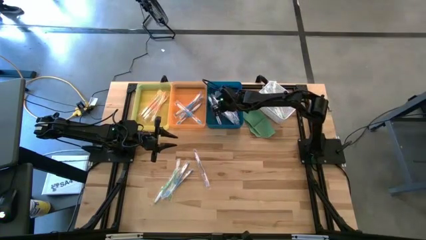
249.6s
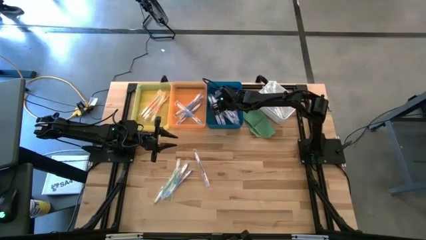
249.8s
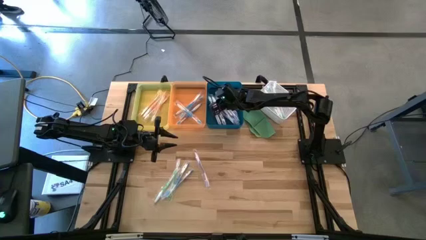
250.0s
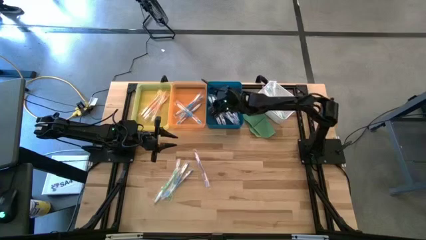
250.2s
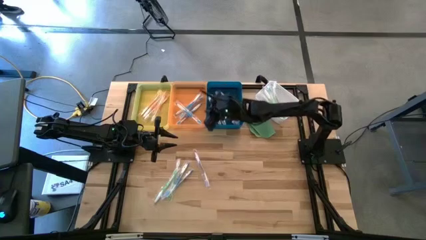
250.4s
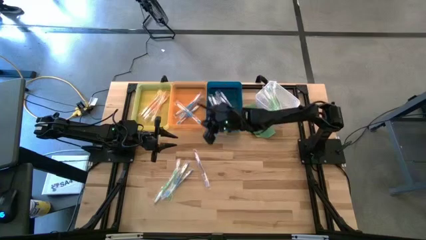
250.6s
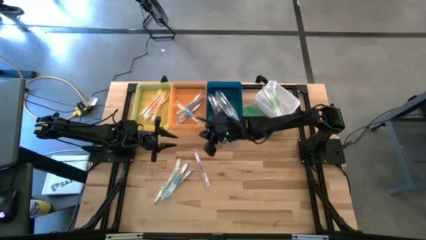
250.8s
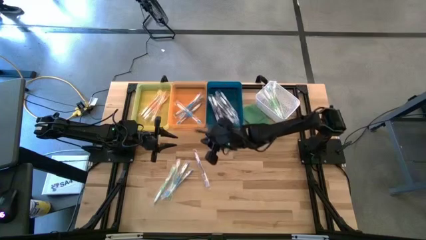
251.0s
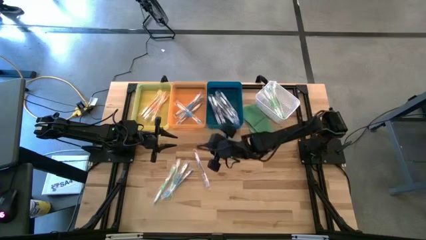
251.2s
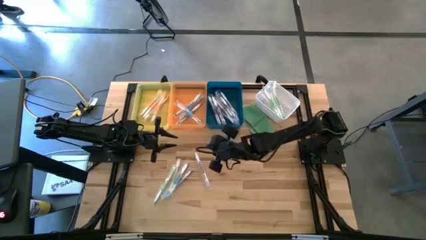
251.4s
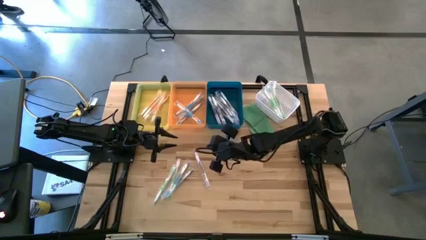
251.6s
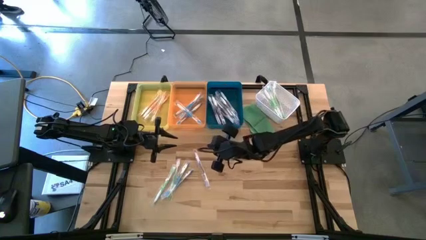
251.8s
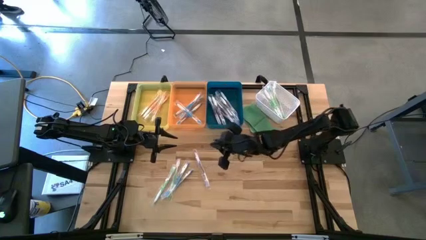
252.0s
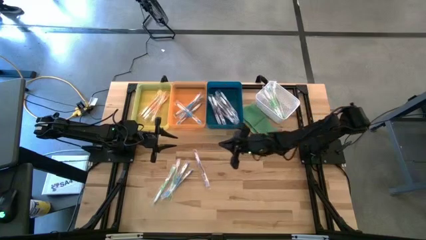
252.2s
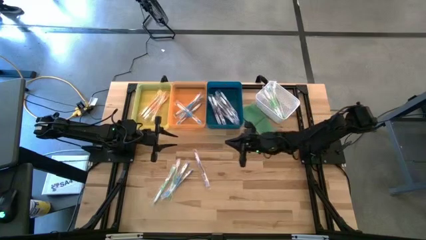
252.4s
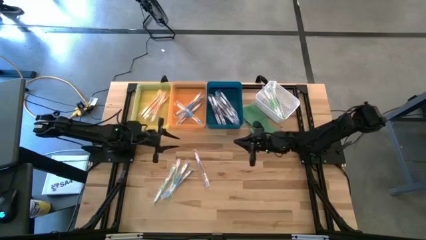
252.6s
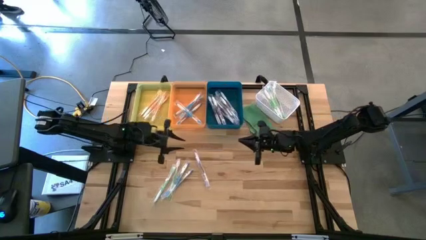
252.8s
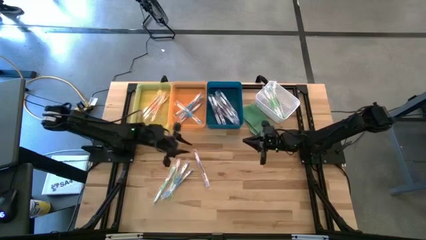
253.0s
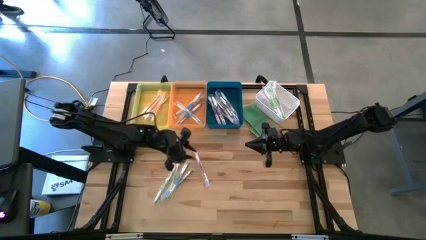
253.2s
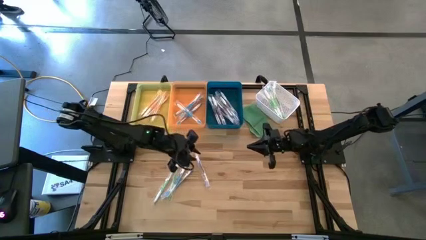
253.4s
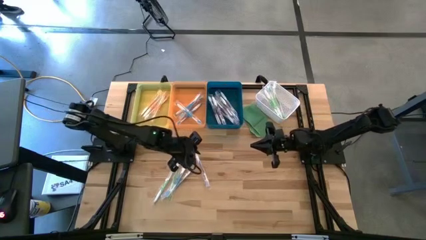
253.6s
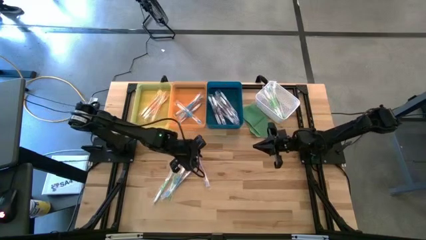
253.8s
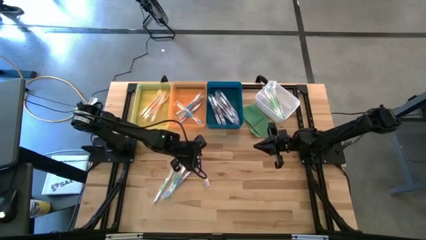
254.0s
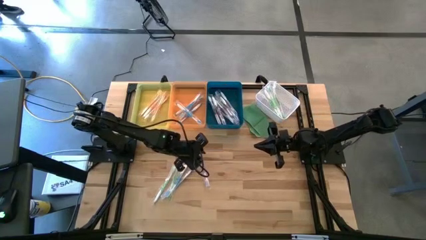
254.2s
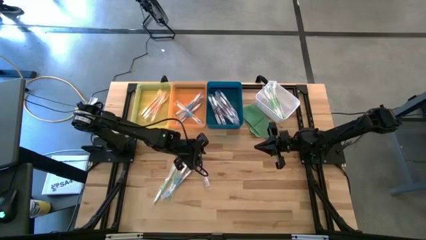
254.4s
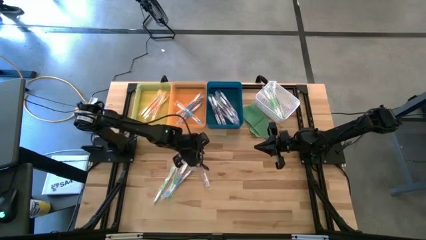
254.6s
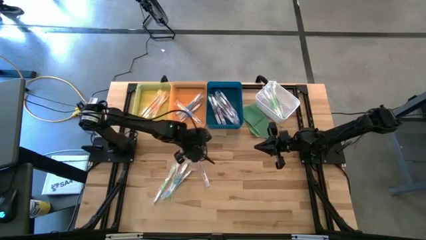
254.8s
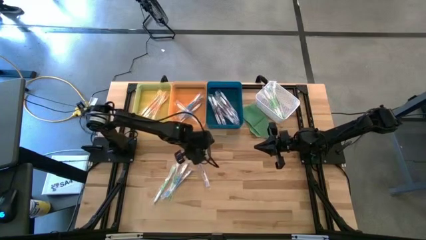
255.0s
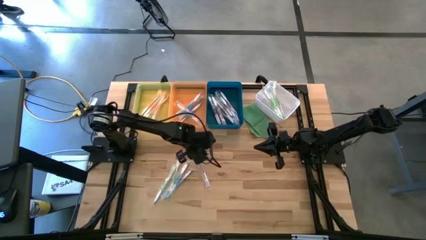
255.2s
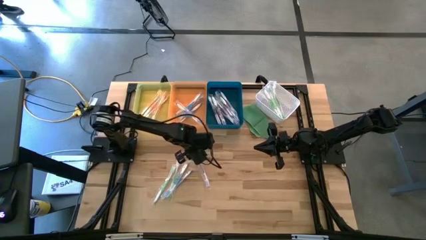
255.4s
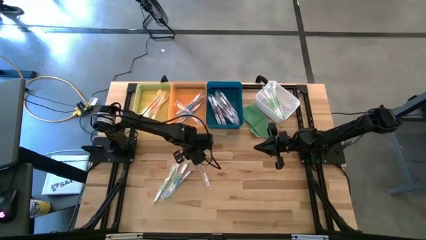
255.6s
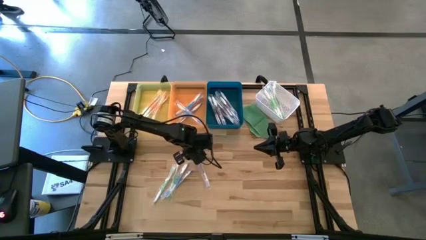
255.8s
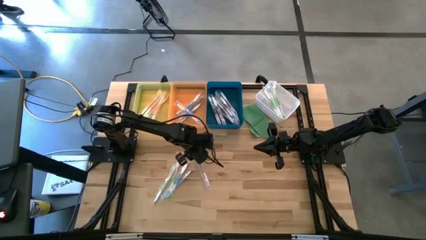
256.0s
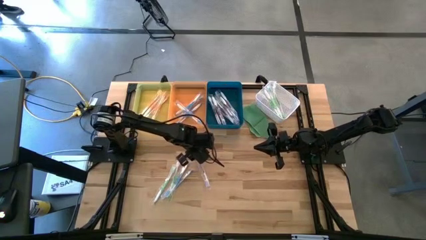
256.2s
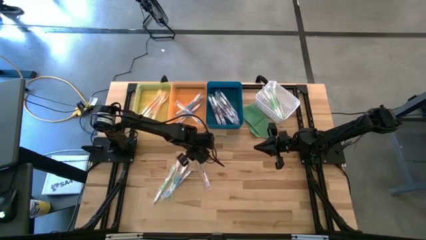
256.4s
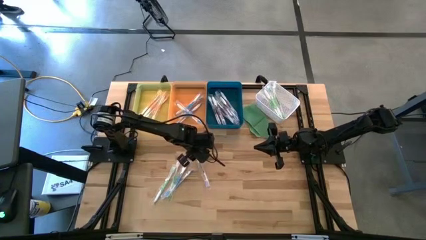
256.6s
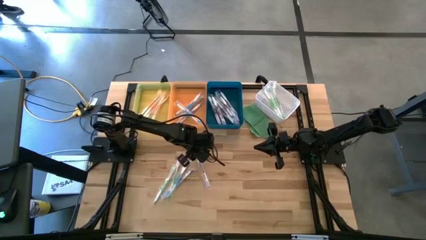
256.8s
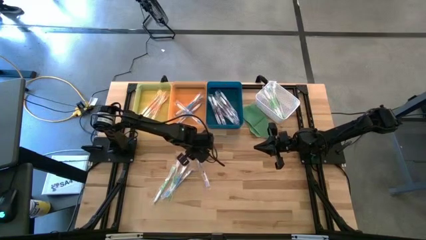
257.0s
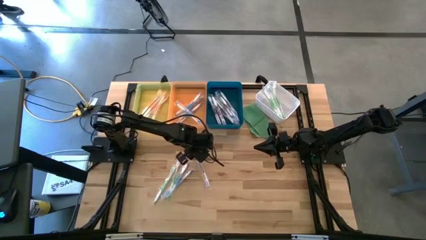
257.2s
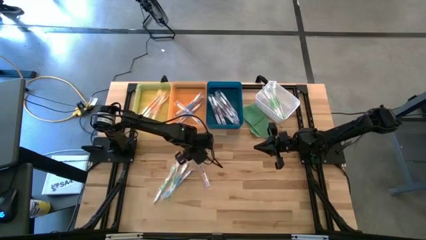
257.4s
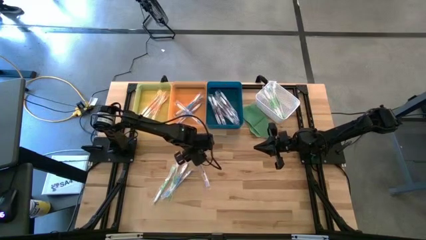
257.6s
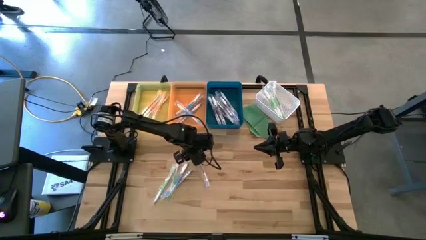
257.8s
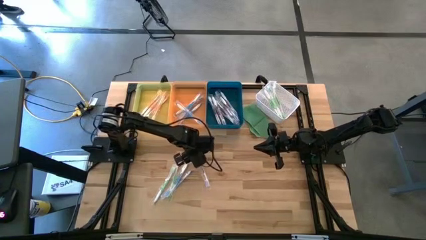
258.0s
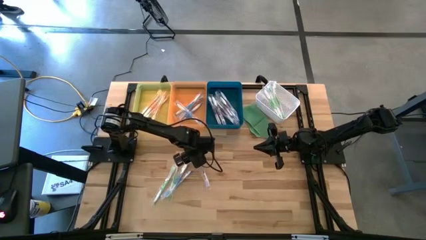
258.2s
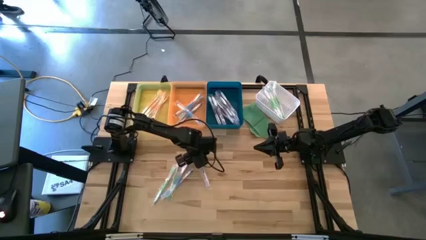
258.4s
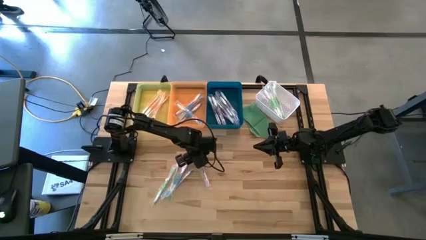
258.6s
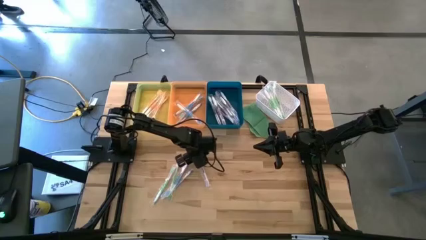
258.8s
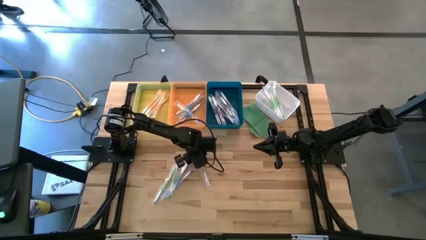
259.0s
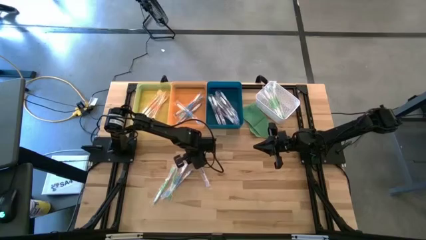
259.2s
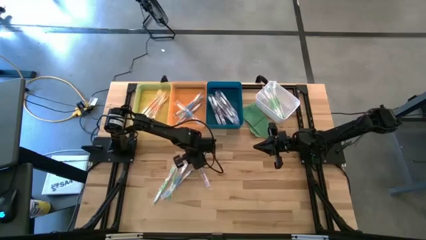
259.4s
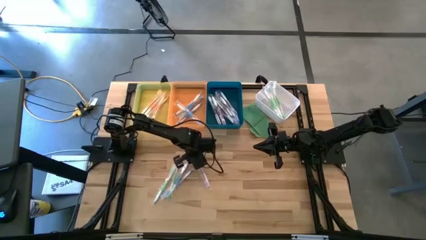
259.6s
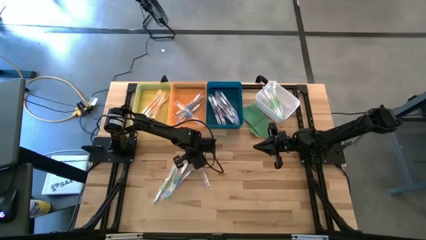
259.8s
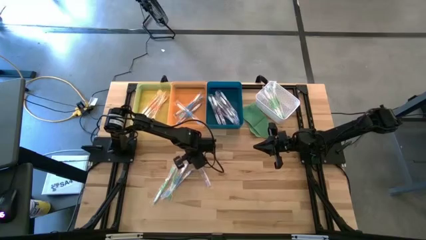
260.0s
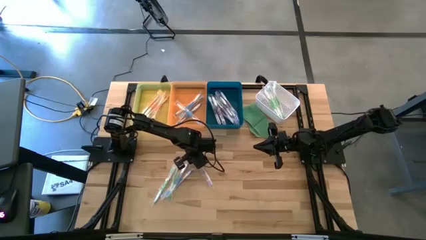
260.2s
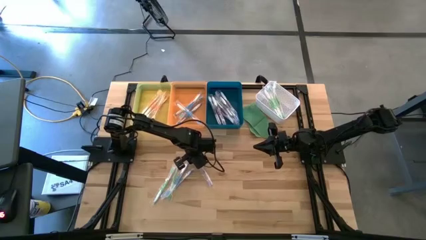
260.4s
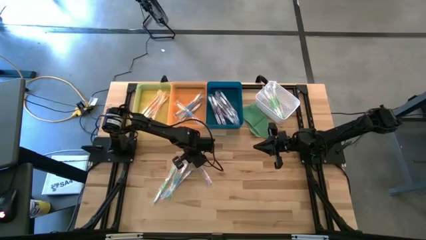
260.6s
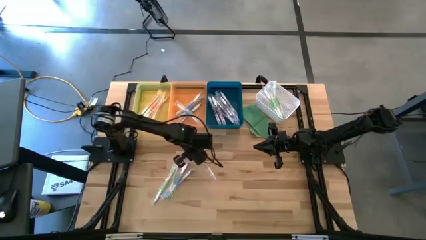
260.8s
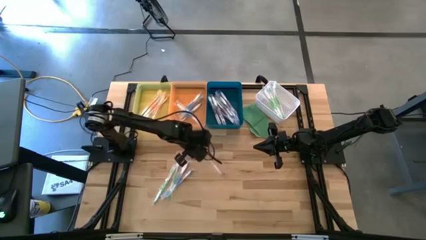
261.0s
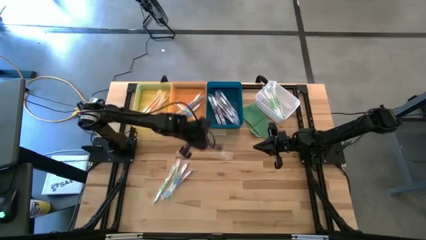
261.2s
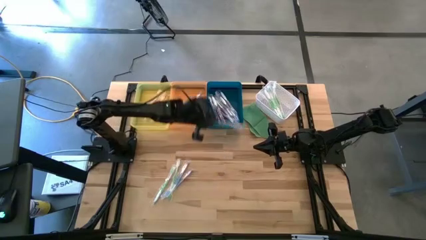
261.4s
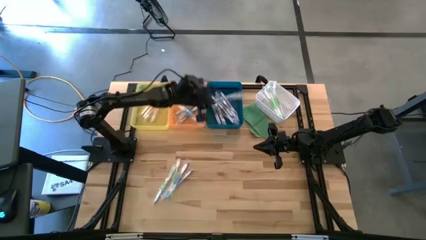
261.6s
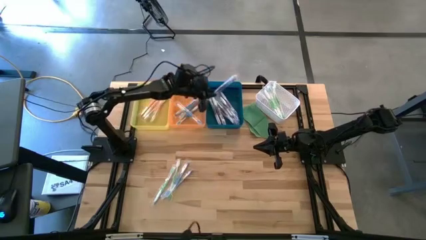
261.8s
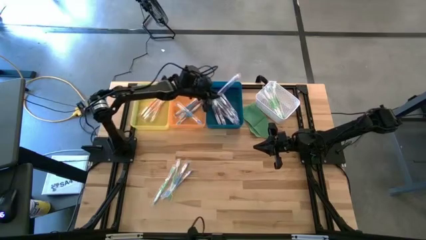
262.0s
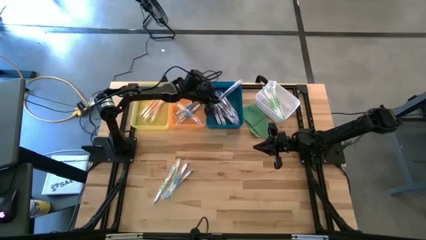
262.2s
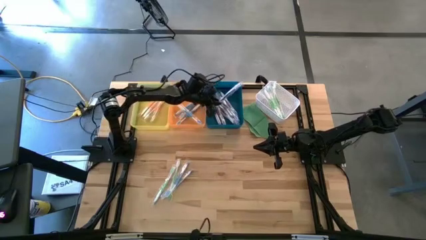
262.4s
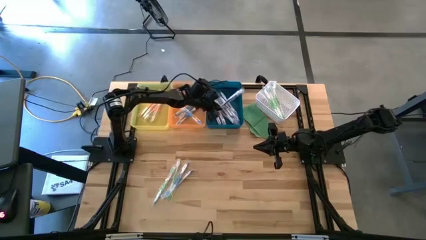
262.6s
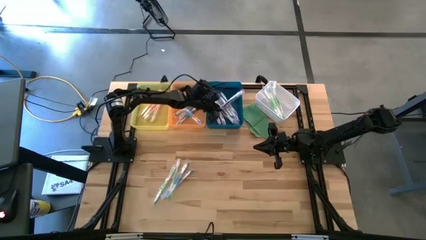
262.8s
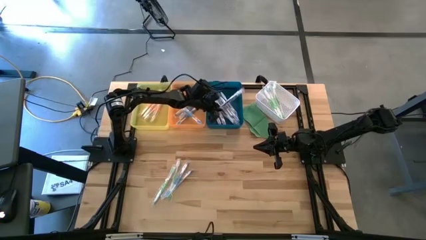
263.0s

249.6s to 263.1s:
Task: Pick & Place Toothbrushes
Put the purple toothbrush into the blue bin

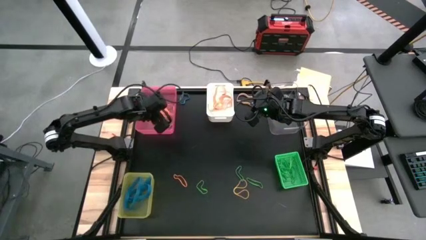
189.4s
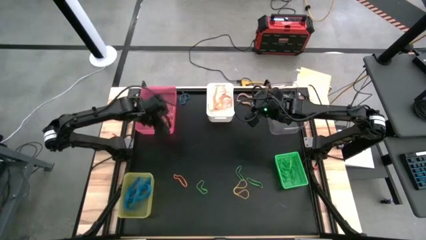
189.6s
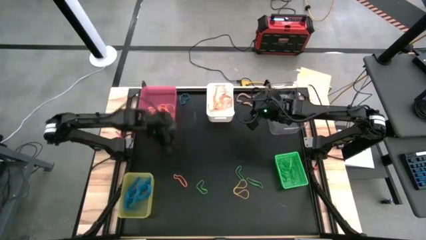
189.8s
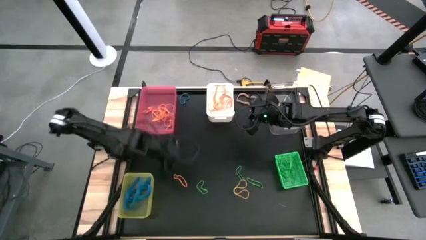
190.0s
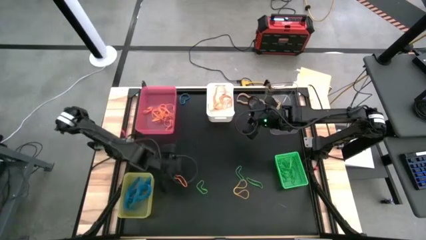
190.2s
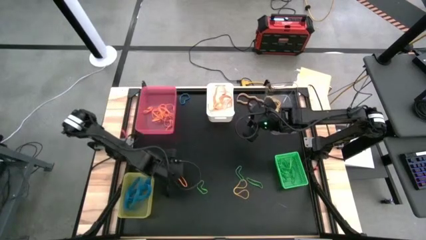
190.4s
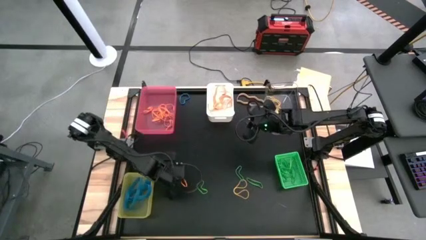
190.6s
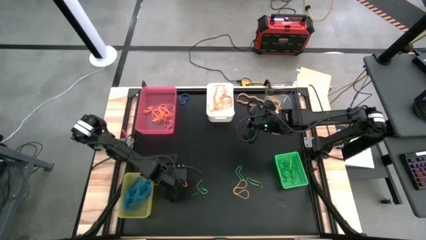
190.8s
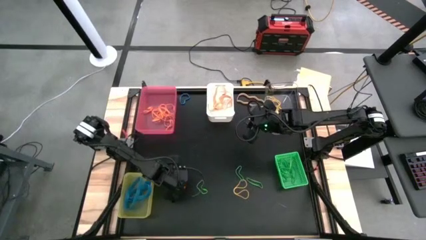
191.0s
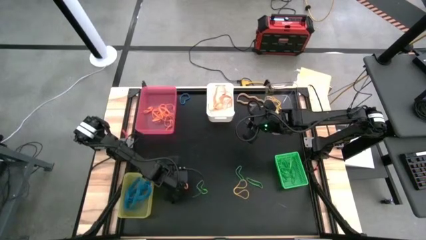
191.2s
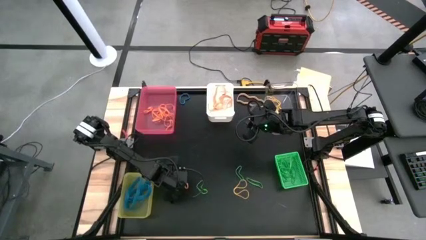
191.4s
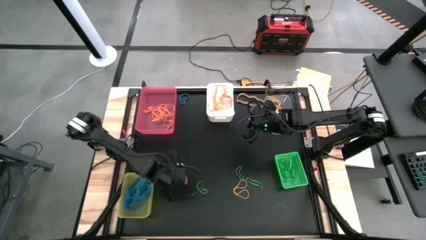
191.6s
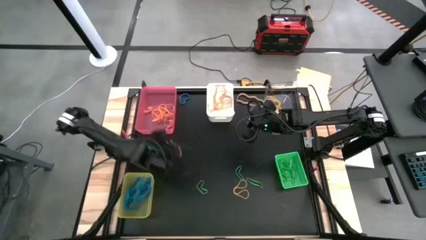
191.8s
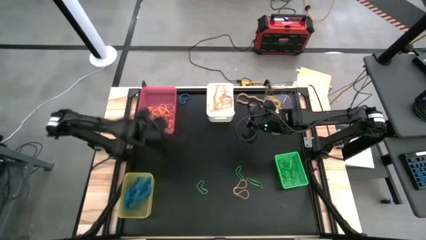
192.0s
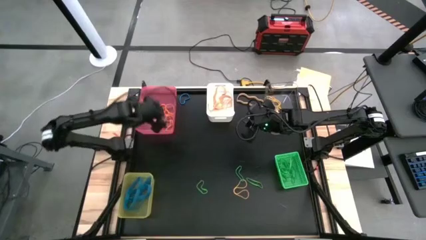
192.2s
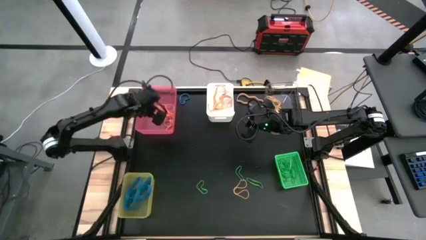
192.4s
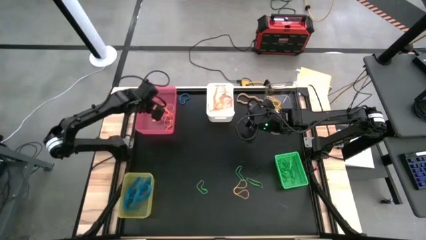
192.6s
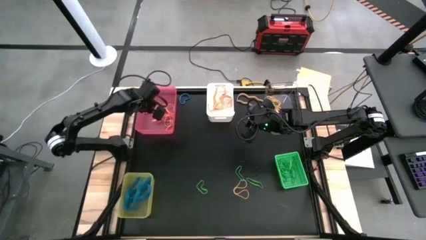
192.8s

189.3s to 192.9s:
Task: Sort rubber bands into baskets
Put the orange rubber band into the pink bin
